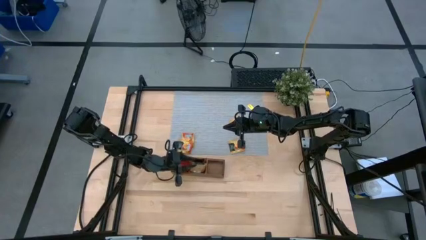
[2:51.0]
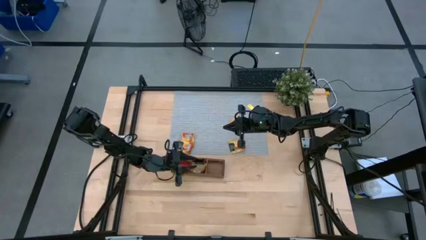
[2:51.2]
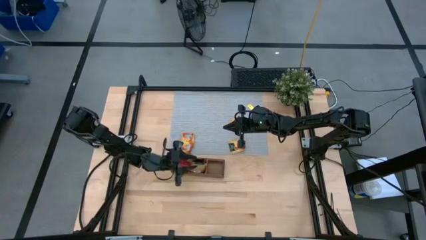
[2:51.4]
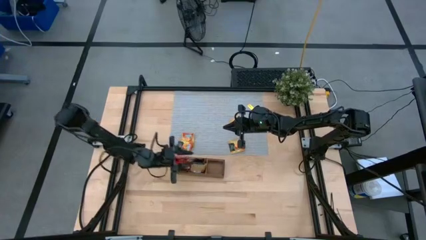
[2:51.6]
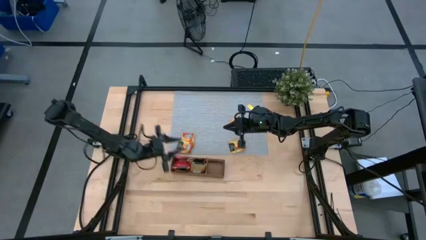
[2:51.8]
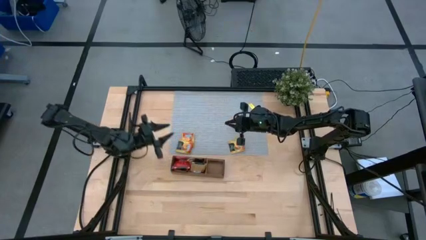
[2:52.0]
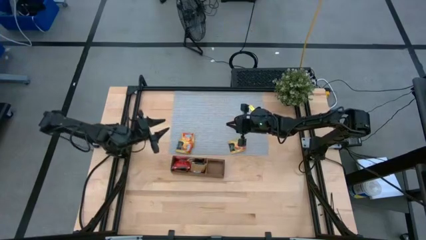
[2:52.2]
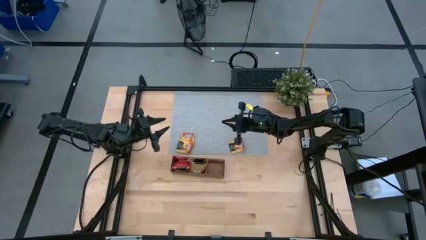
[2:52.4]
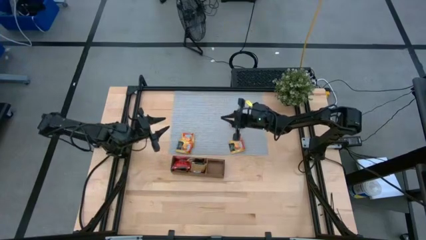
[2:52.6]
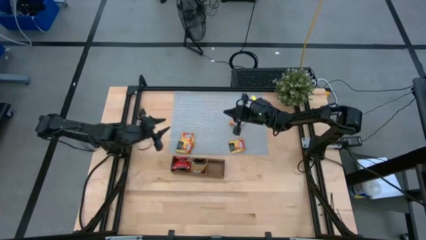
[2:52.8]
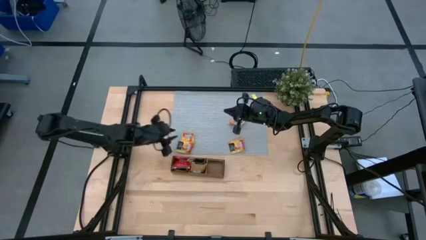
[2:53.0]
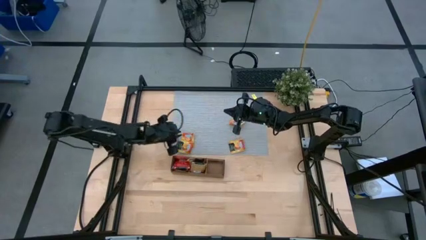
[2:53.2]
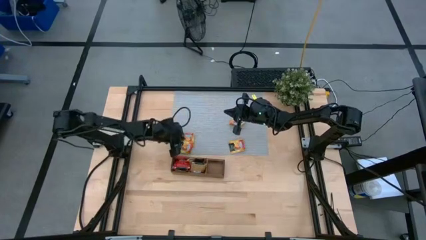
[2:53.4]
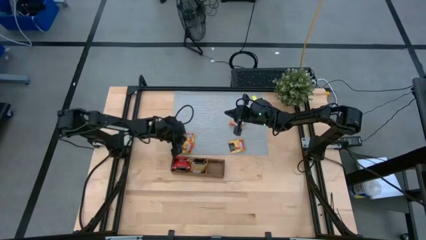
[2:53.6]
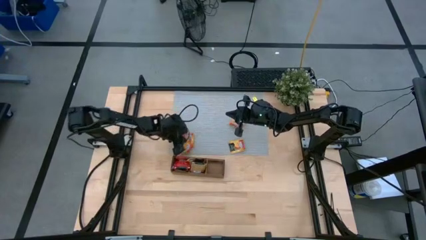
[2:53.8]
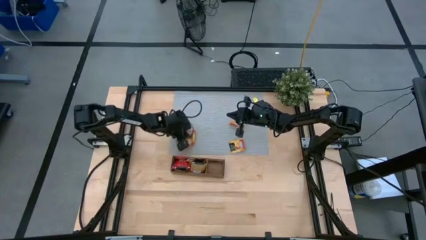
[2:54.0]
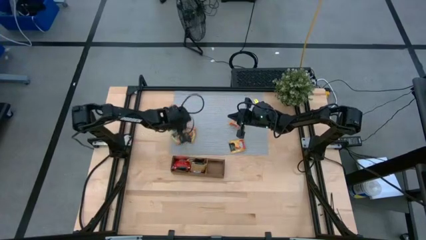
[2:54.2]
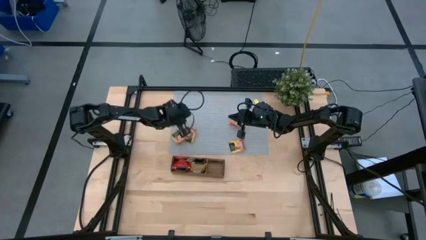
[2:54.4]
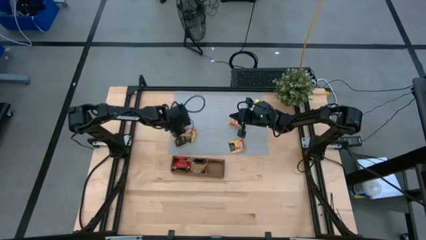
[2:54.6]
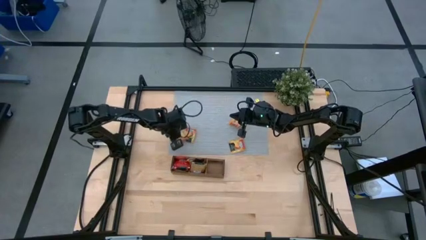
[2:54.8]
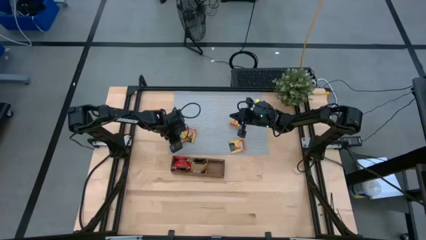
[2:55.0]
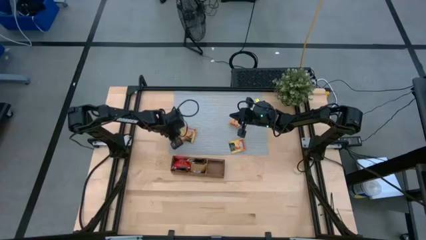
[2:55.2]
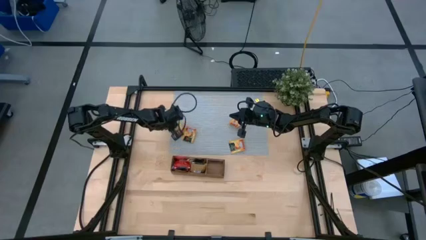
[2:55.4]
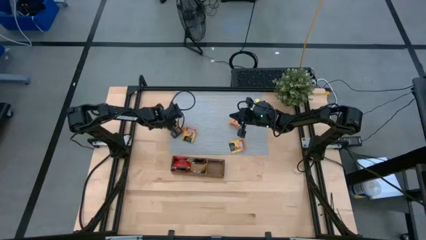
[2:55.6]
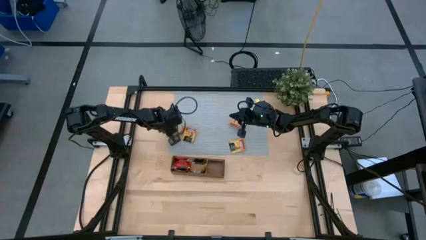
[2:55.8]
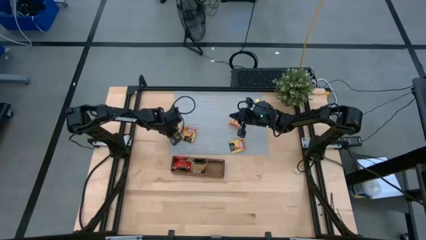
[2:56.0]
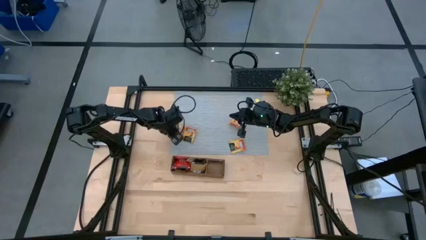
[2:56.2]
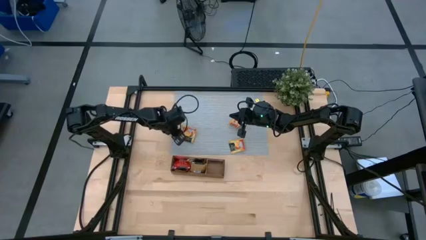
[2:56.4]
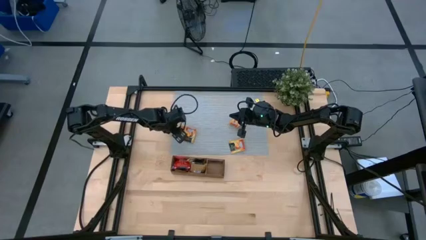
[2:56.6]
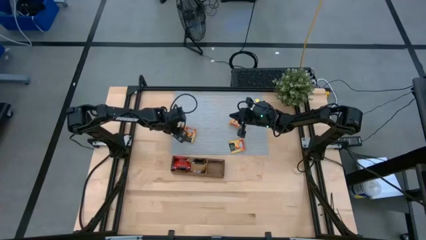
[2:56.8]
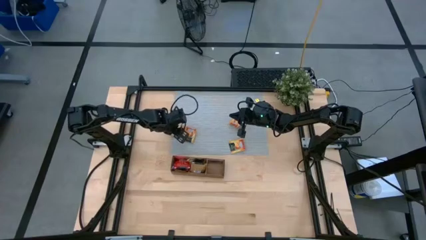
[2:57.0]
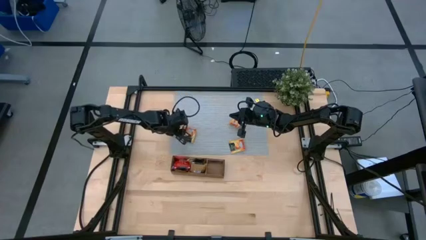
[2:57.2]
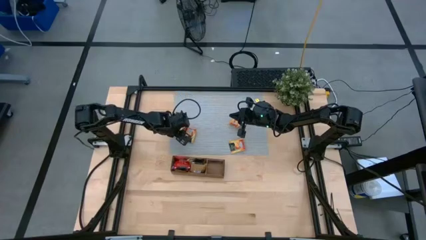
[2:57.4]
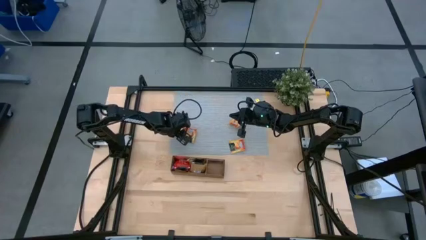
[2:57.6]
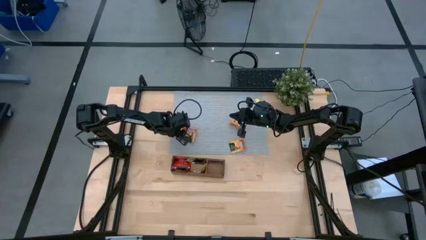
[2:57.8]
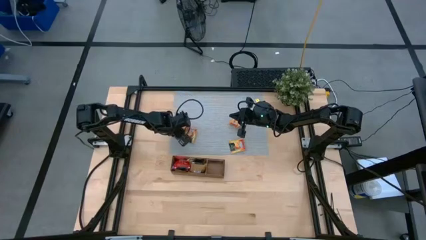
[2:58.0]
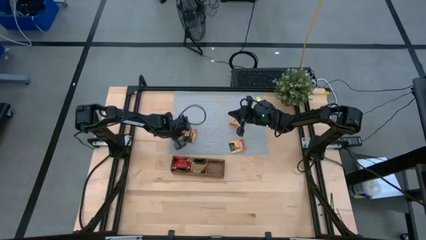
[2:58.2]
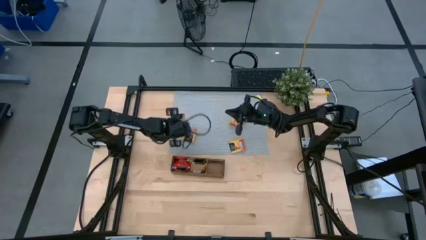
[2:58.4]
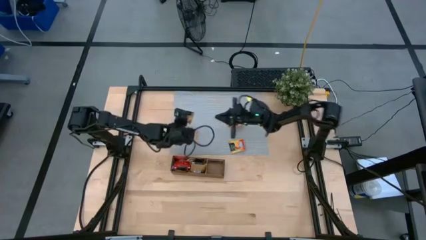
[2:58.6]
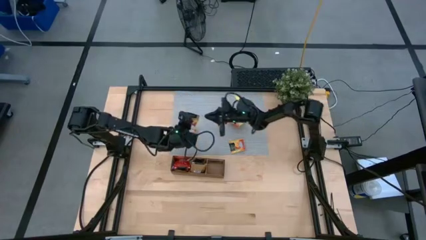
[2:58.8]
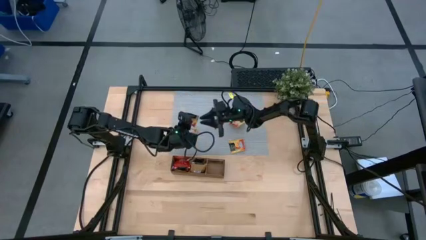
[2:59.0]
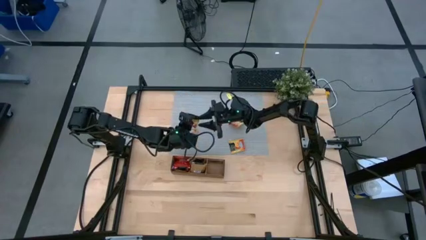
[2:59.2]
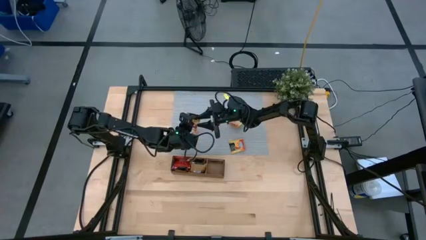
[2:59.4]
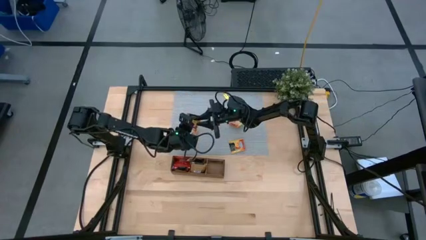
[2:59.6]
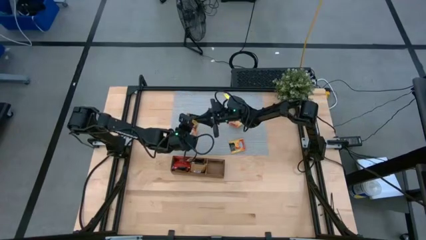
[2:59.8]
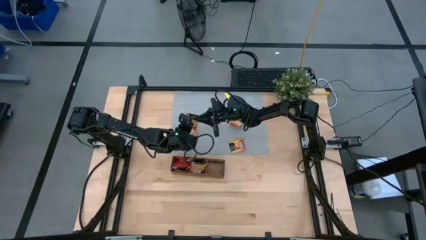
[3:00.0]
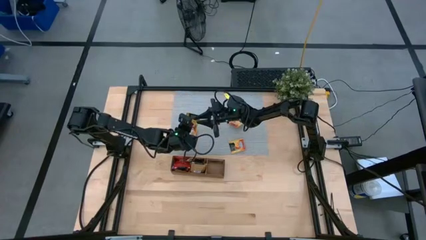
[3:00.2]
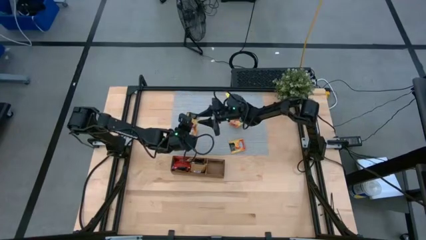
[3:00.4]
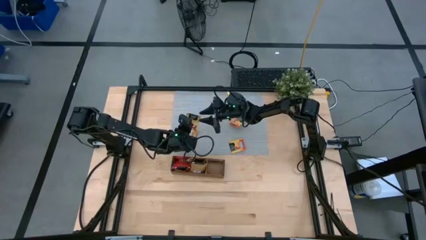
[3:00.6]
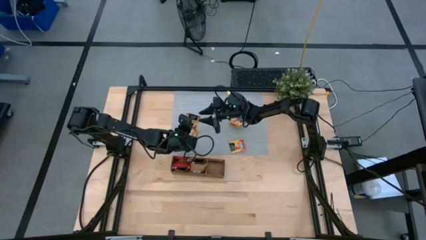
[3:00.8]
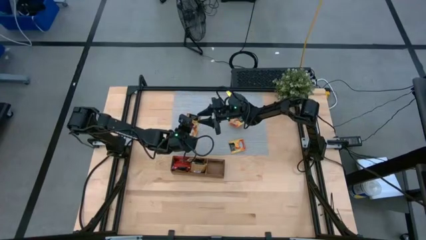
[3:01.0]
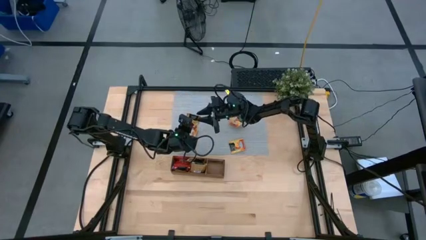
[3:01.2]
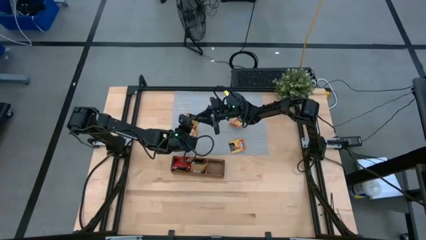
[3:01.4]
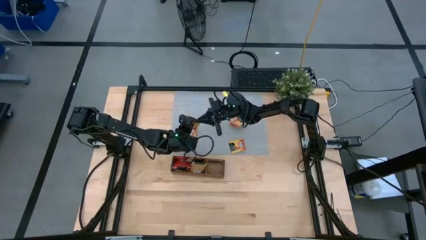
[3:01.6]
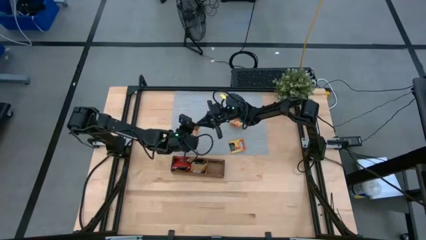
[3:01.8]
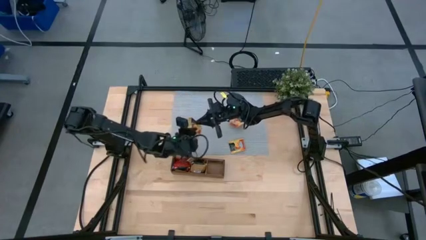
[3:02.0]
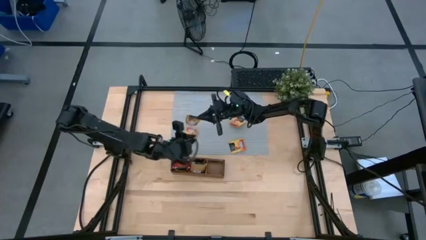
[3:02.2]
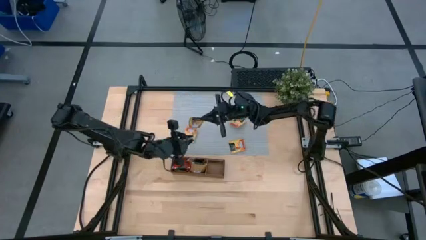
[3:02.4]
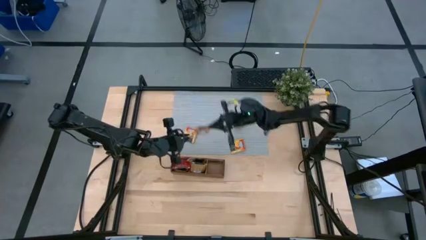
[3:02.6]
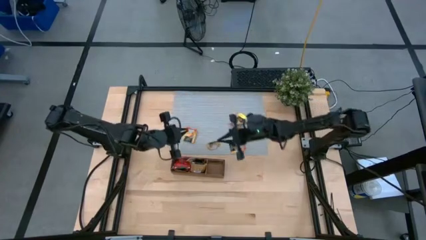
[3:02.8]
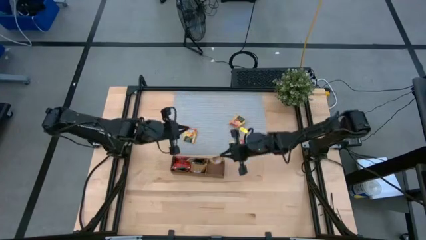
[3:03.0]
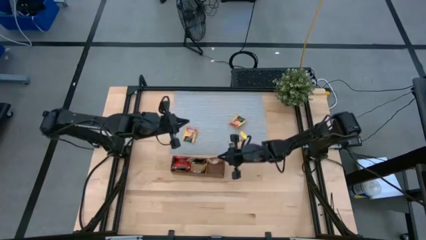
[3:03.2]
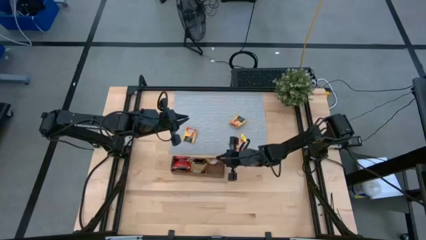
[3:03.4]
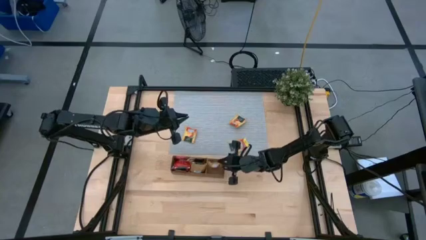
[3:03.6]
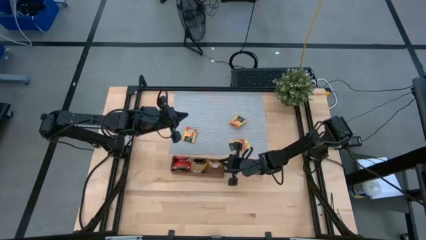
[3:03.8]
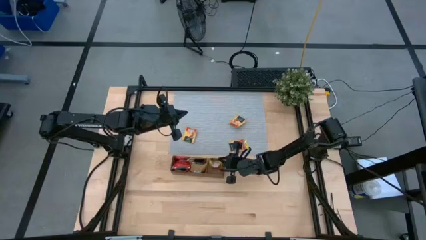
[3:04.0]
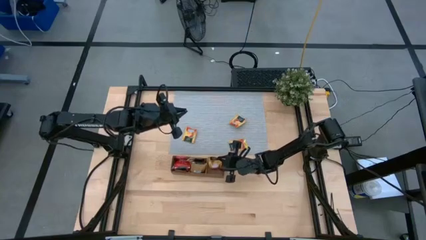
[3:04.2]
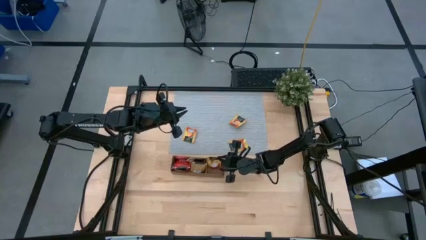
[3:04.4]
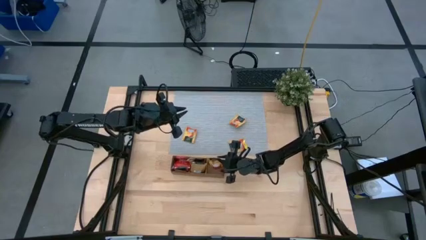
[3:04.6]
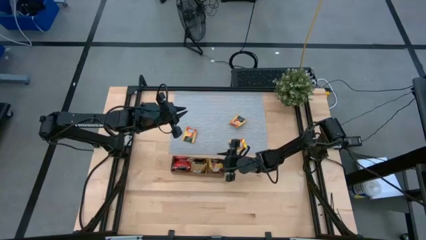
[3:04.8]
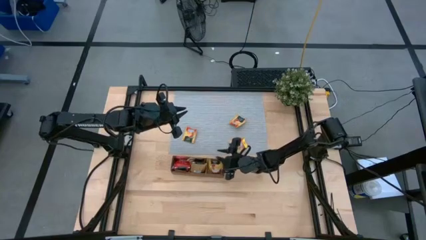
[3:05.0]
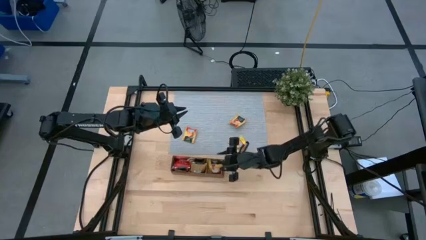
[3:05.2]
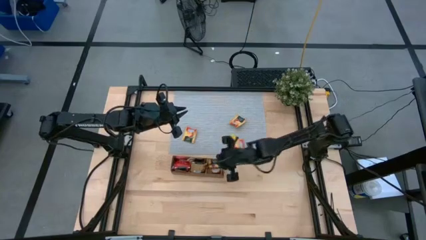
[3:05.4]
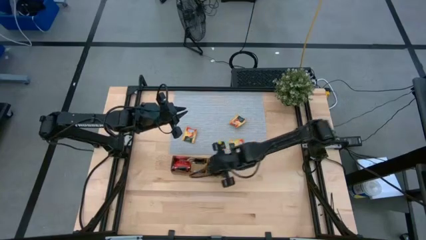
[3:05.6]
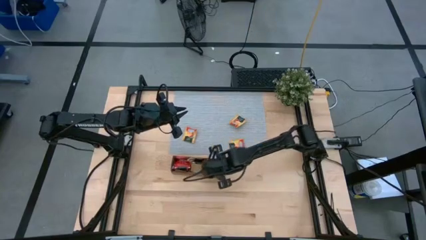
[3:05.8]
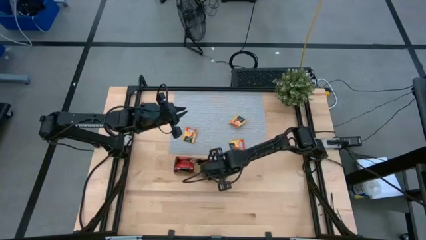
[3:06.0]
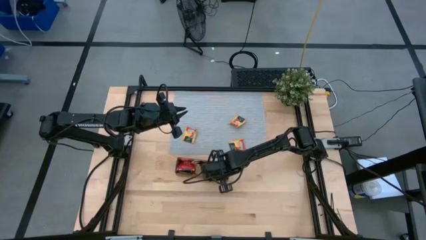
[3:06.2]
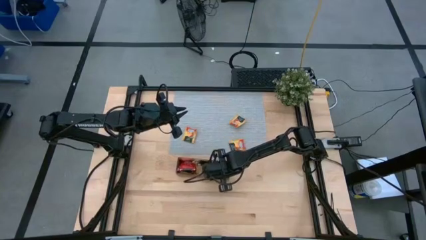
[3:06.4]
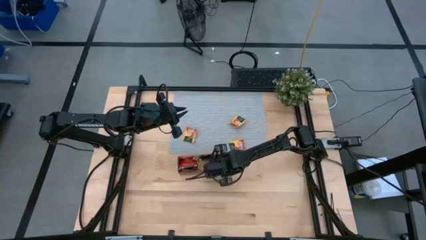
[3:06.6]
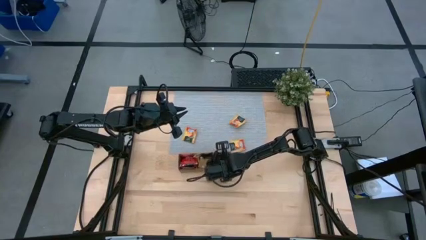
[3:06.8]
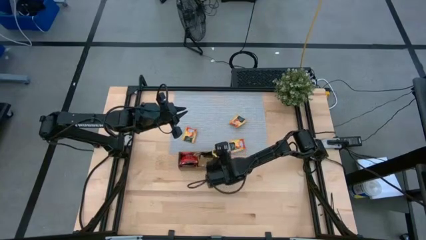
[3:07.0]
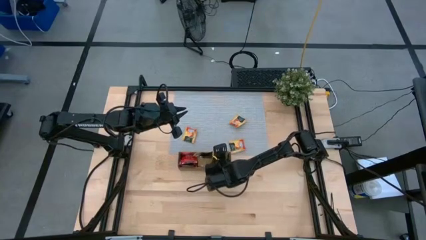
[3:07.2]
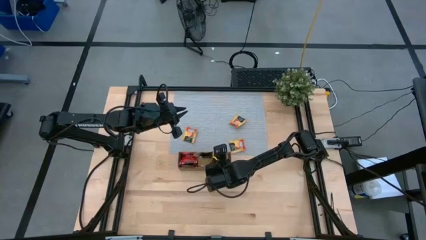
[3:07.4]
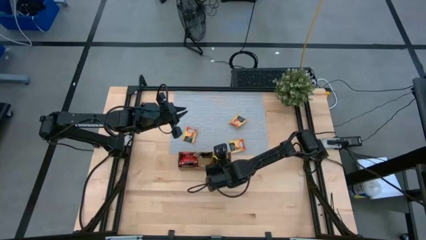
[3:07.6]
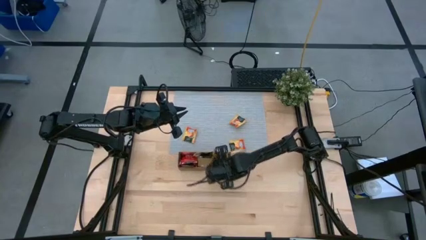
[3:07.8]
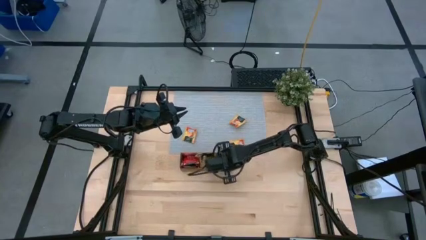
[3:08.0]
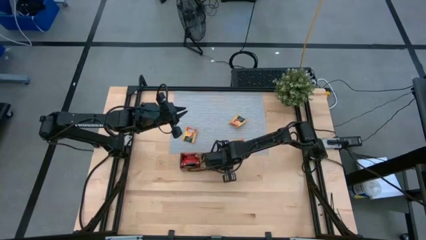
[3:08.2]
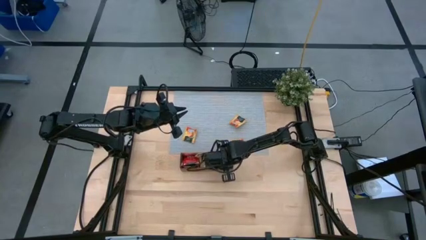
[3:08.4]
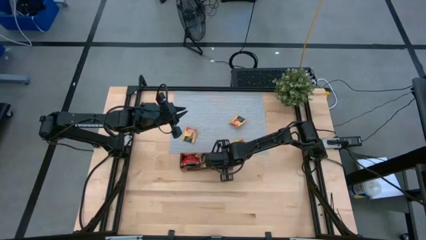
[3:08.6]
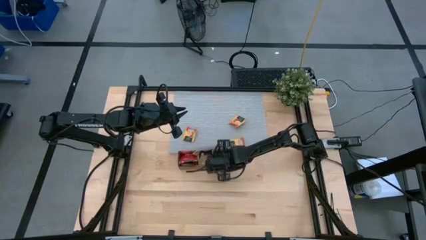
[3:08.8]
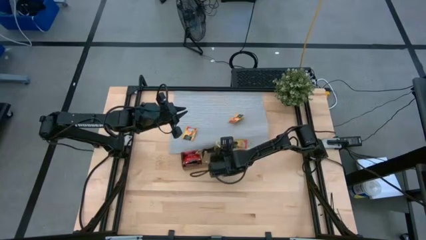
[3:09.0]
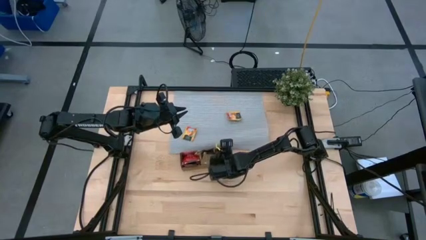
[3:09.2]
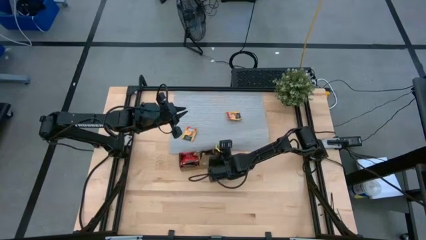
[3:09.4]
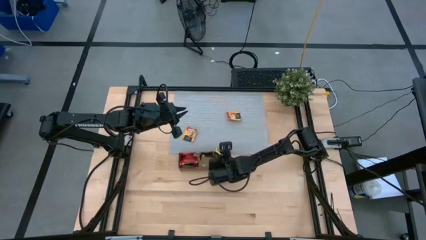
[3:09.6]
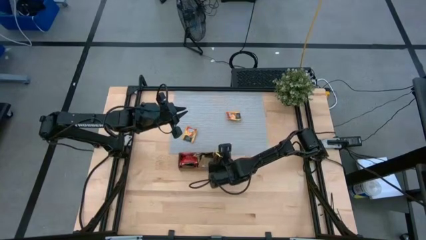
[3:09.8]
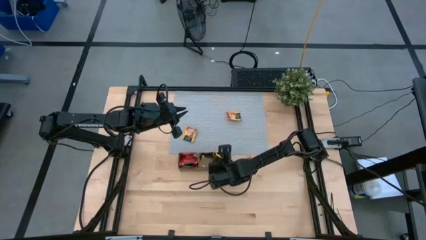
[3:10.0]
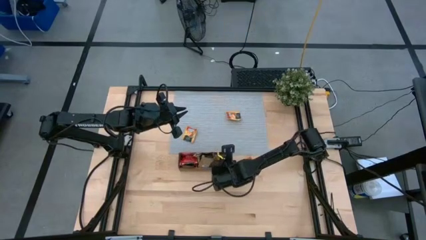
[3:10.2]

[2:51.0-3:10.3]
Task: Pick & Place Tea
Put the yellow tea bag into the right section of the wooden organizer
